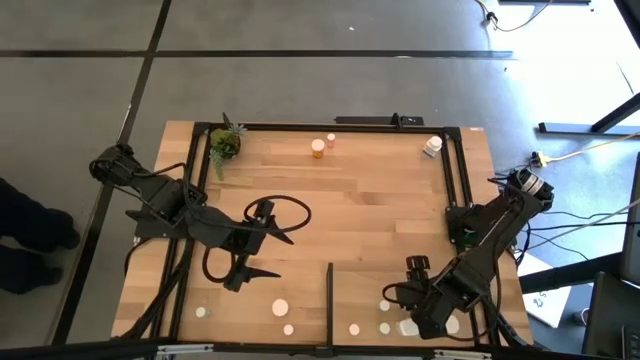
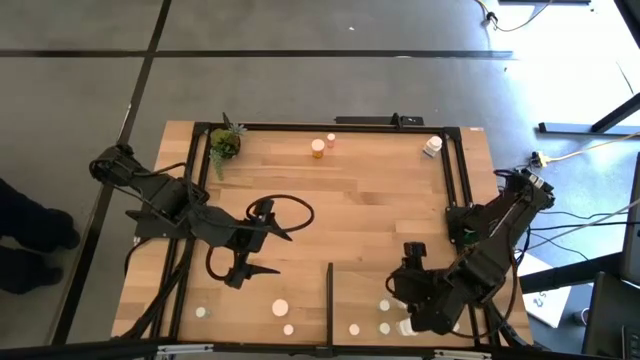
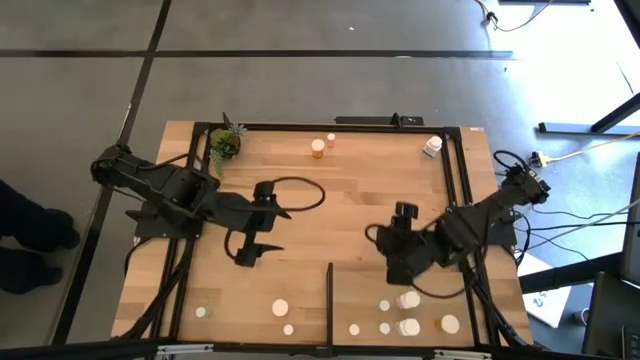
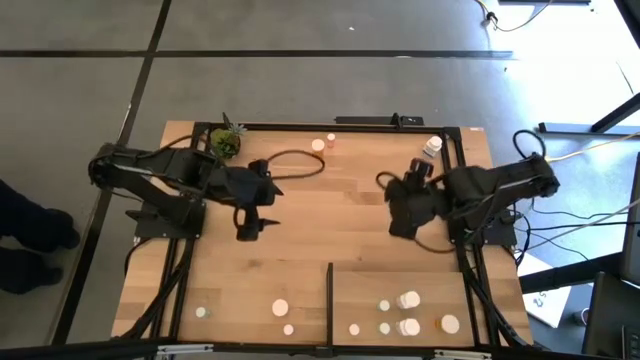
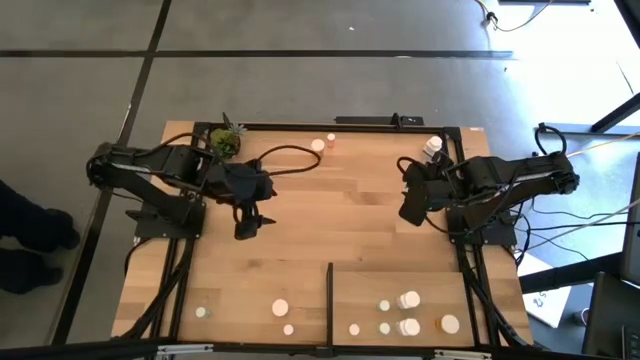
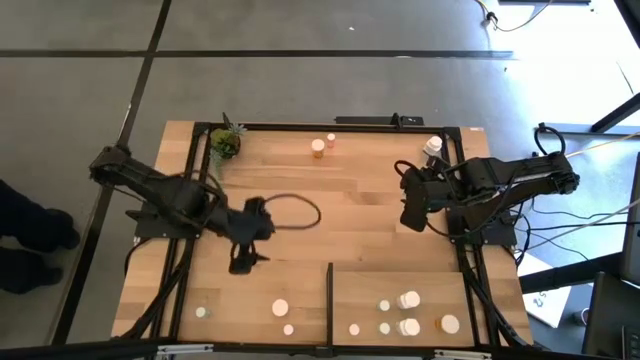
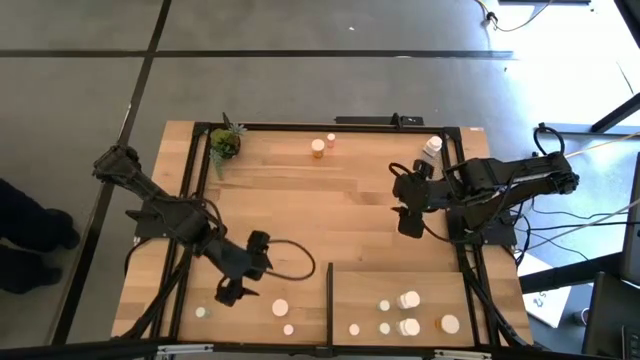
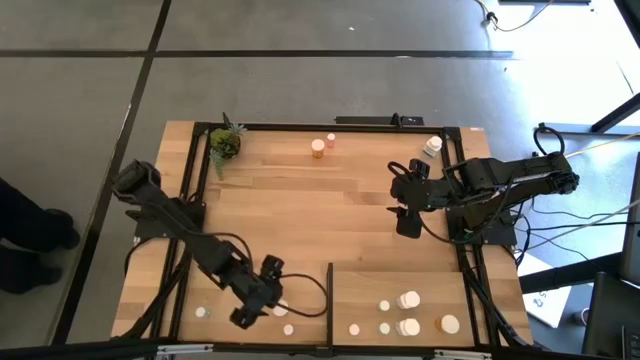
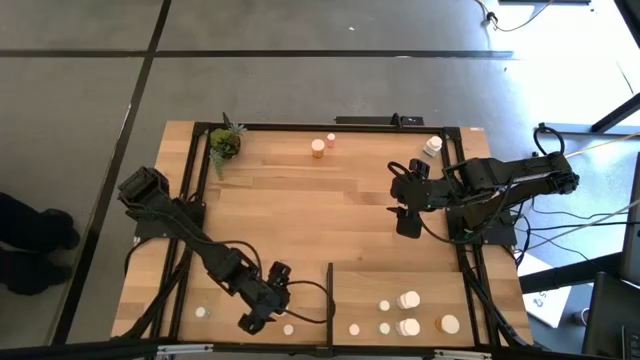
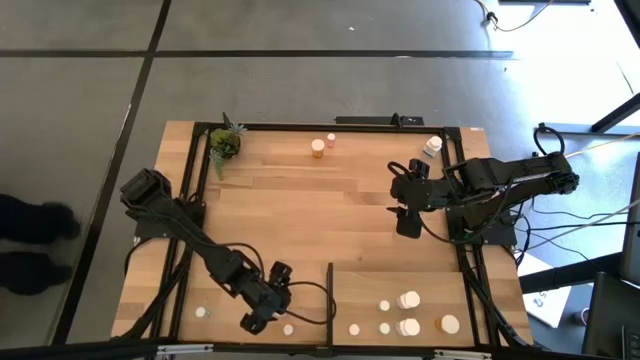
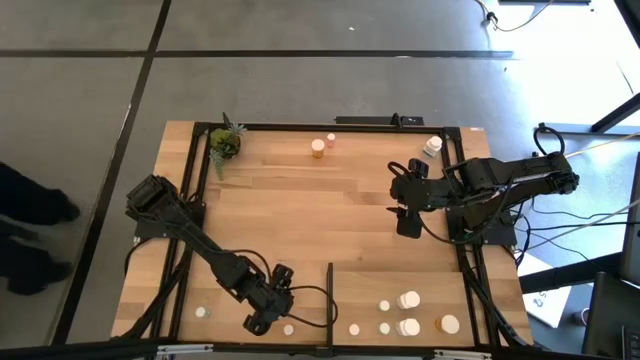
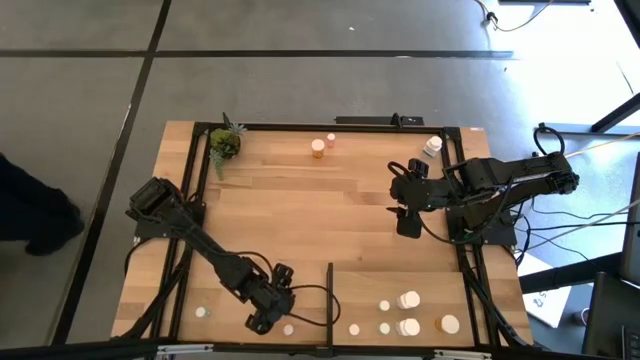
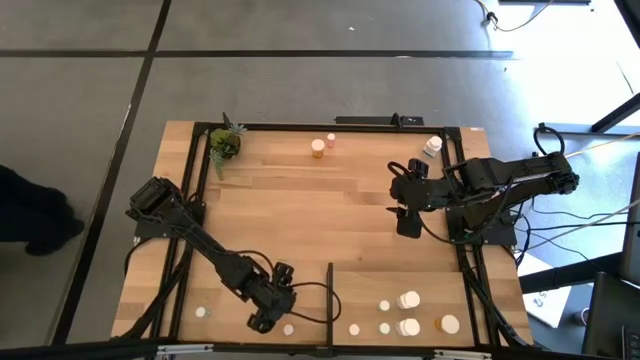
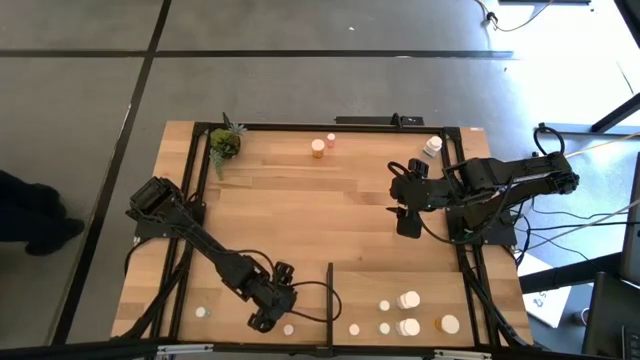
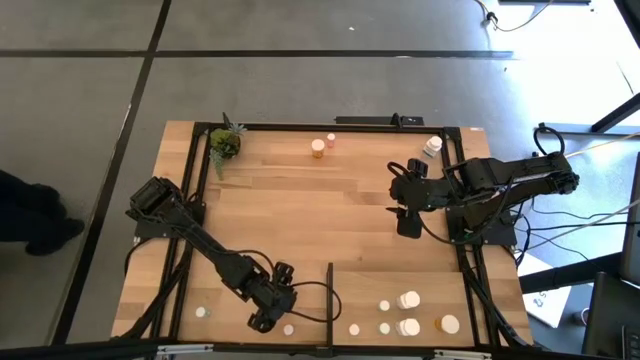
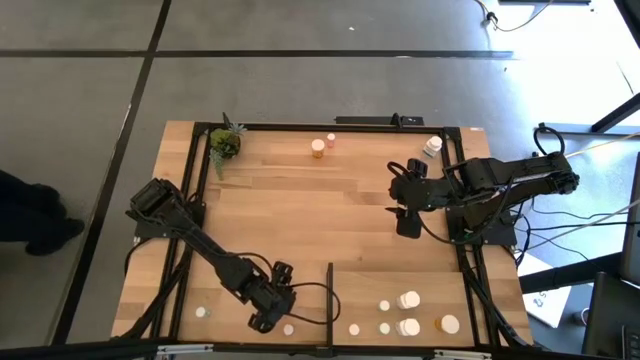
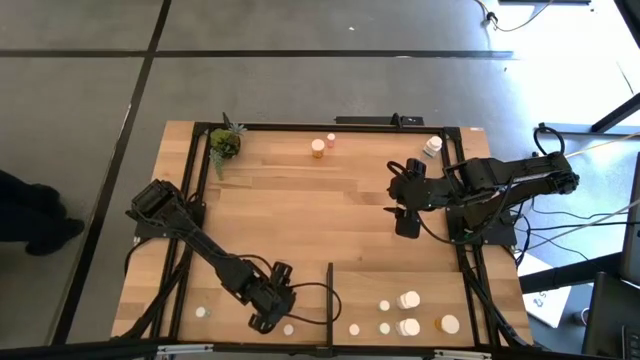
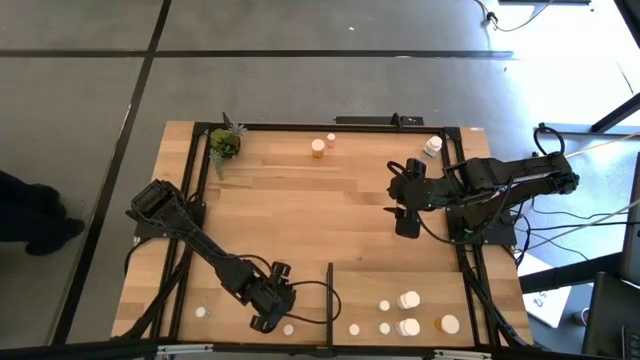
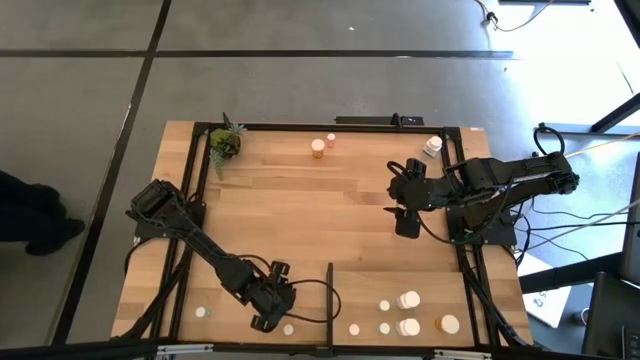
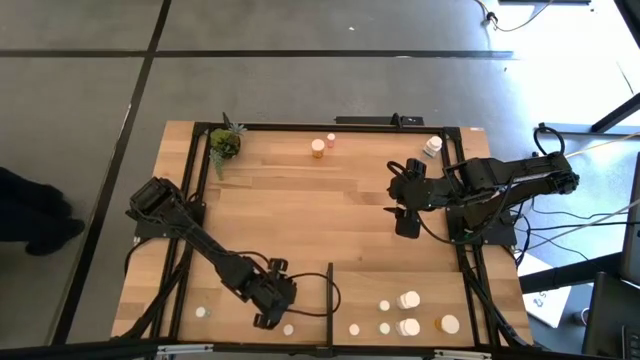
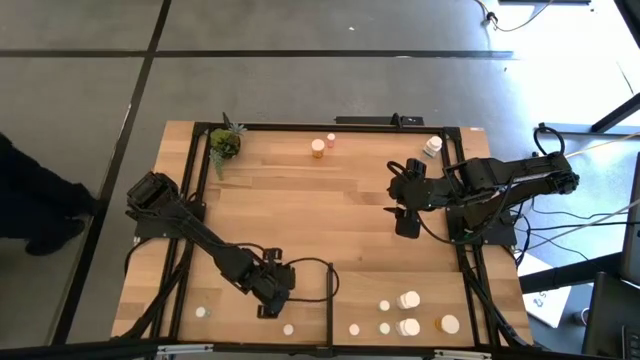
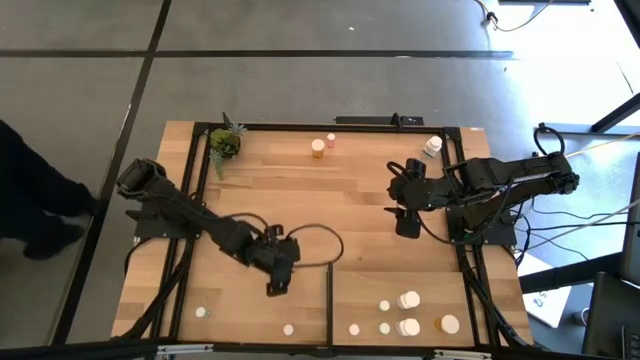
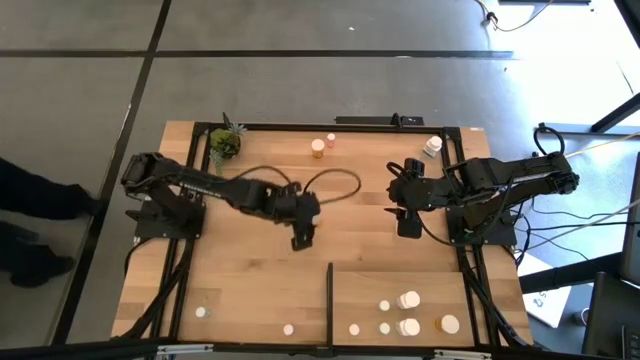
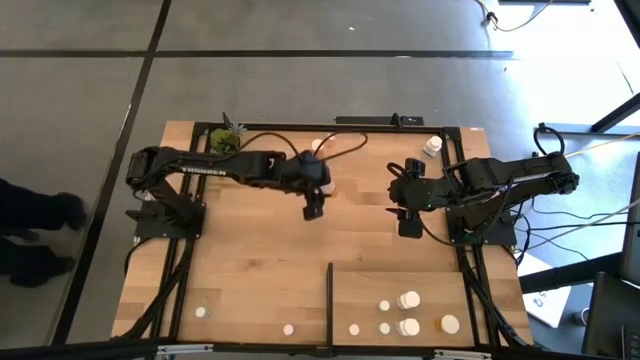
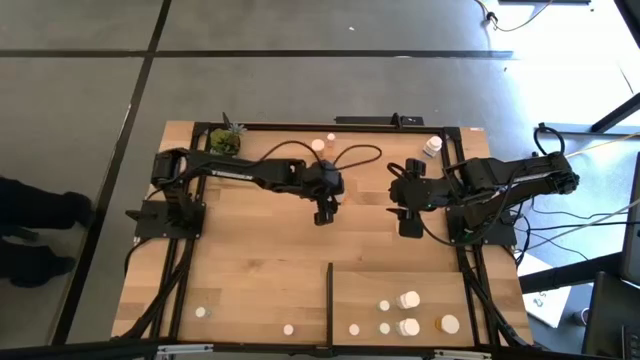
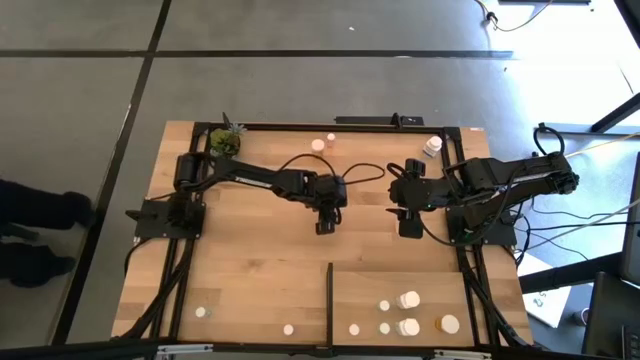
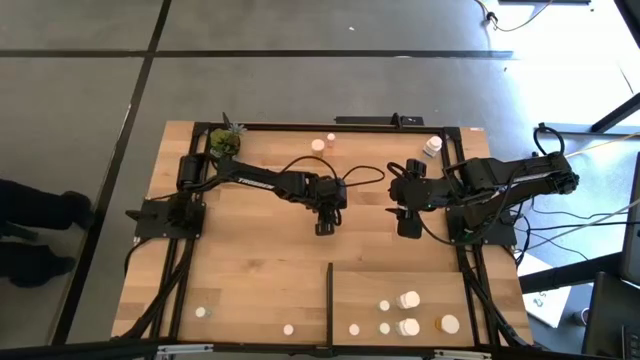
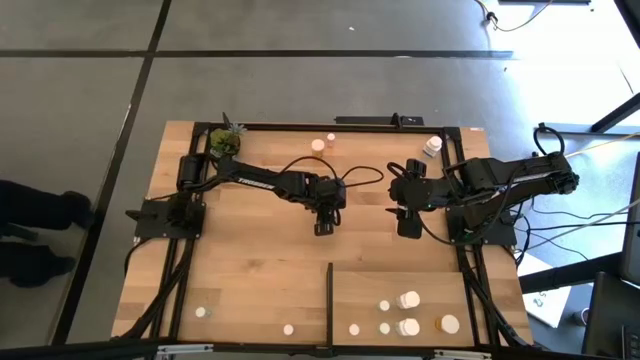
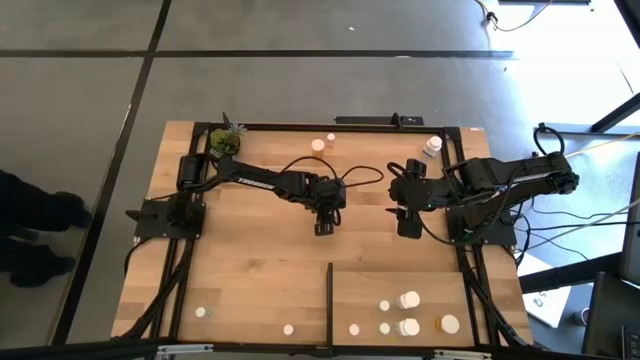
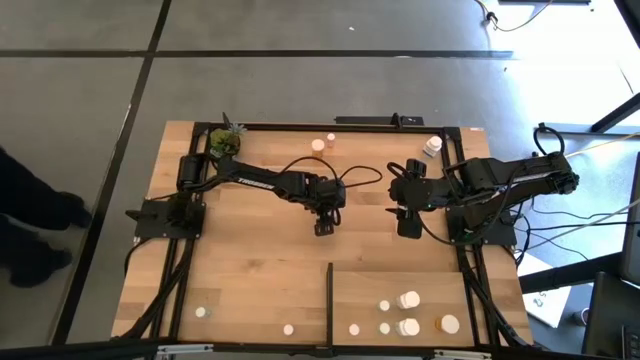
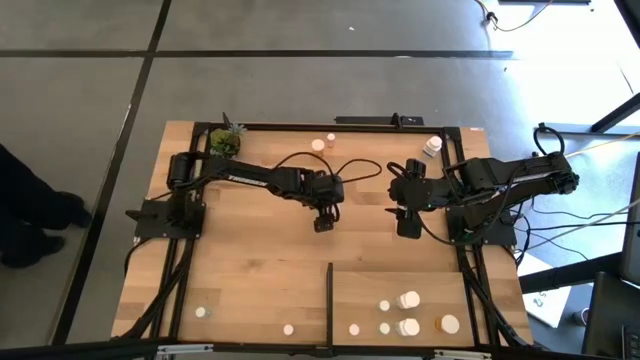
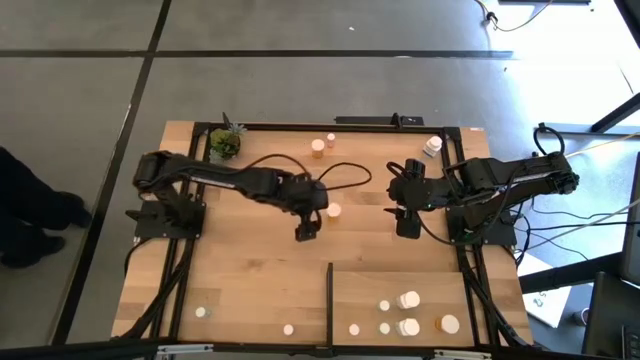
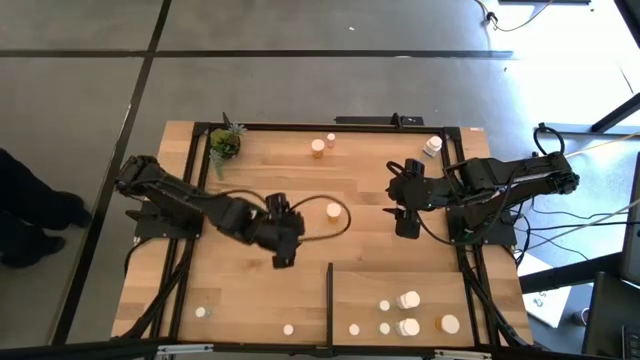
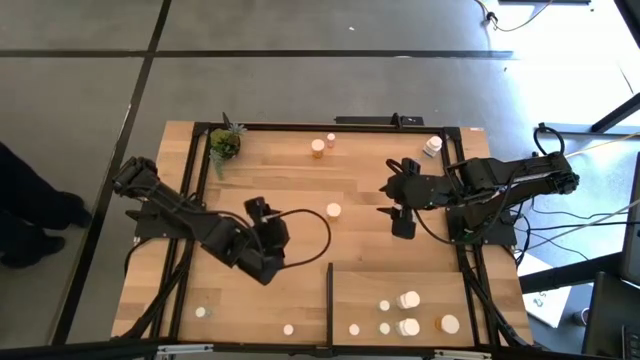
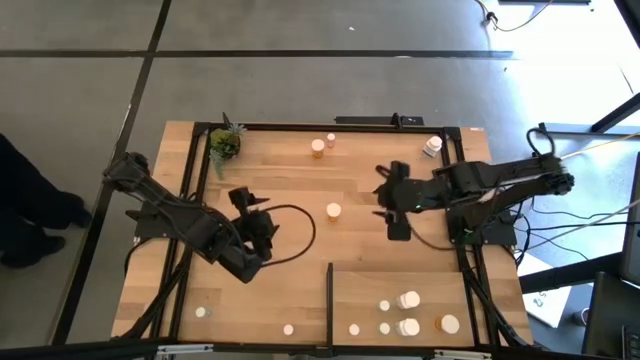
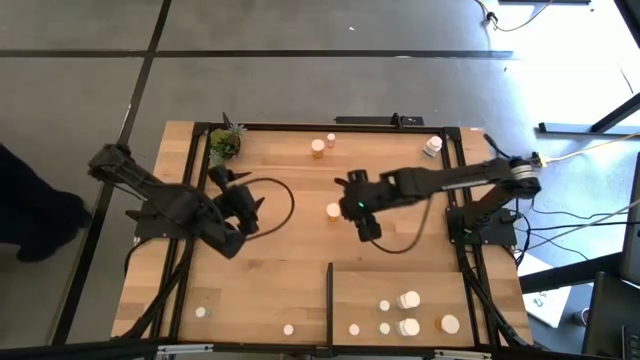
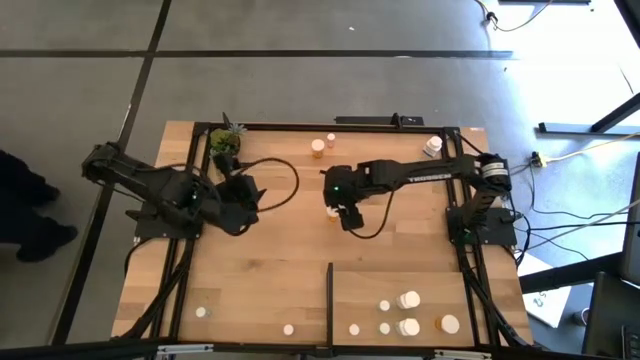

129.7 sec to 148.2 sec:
Task: Pick and place medicine bottles onto shelf by color
Put the bottom orange pill bottle on the shelf aligned with the other orange pill bottle

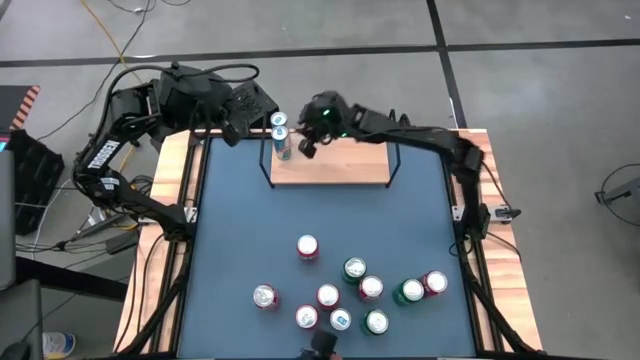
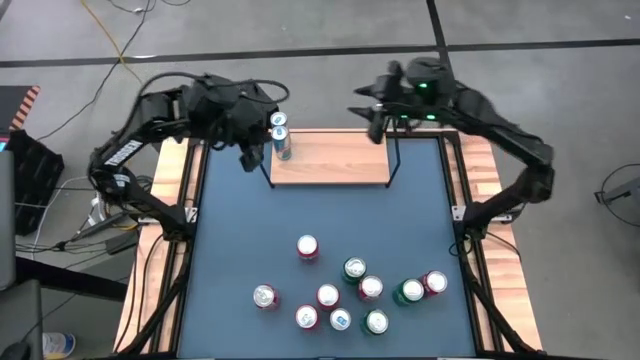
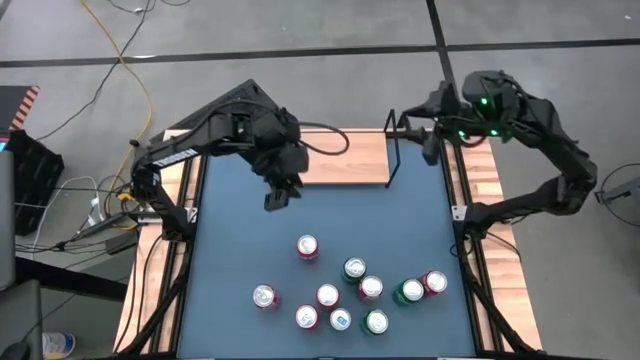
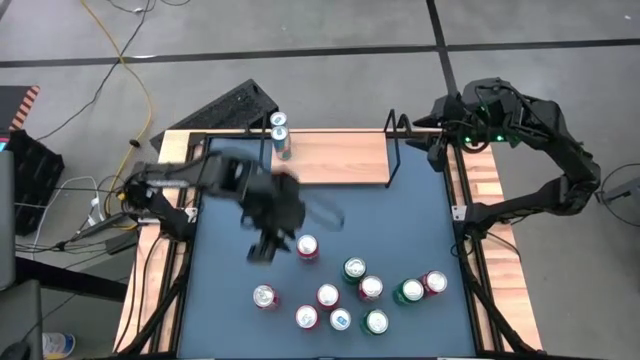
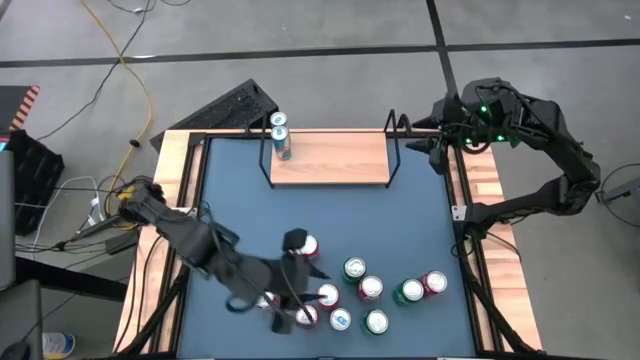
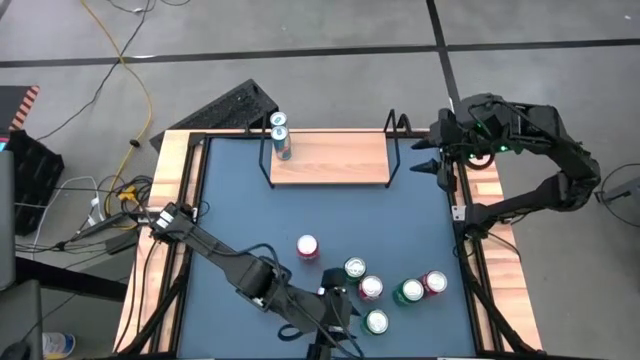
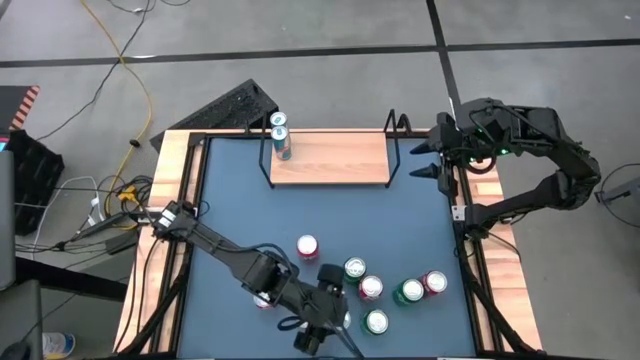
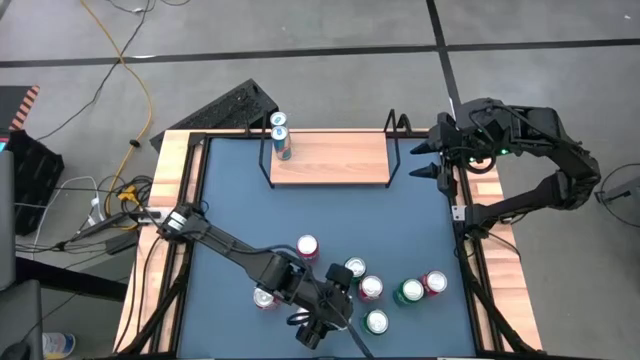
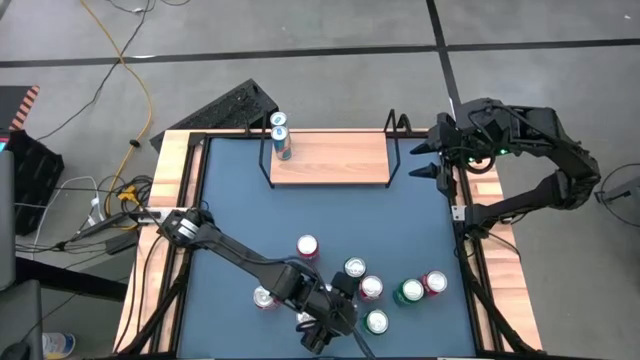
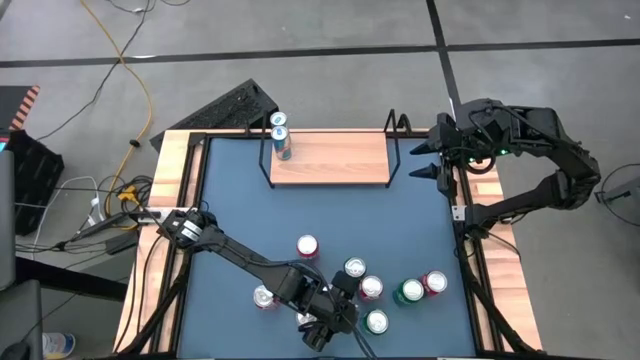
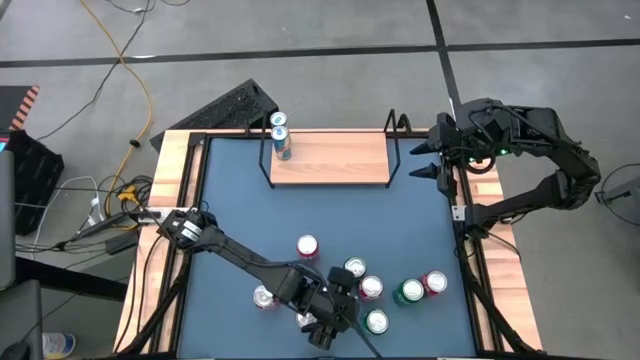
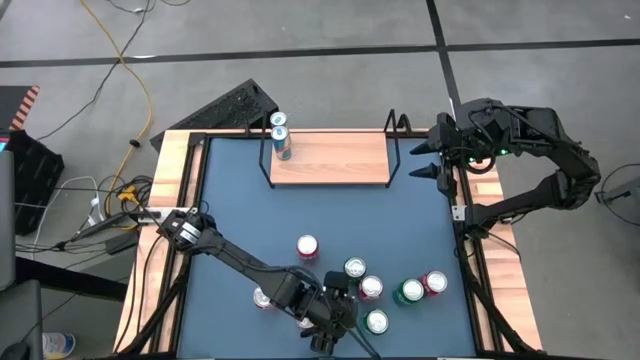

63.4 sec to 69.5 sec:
Task: Place canned beverage on shelf
Put the blue soda can on the shelf aligned with the other blue soda cans
